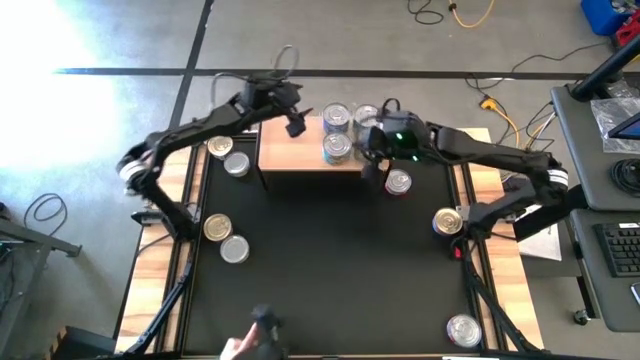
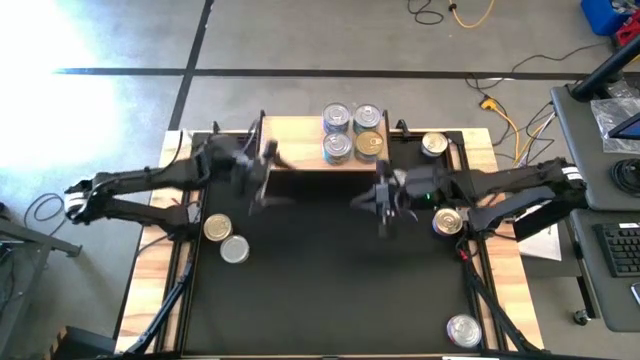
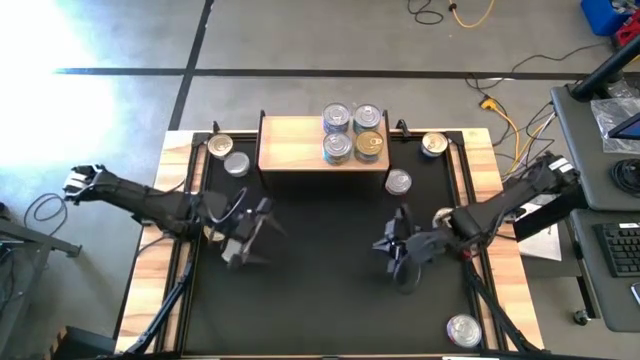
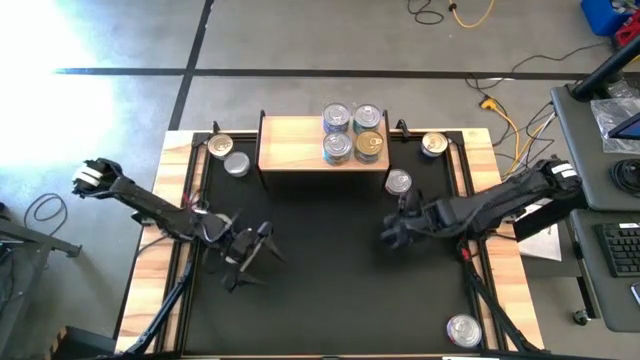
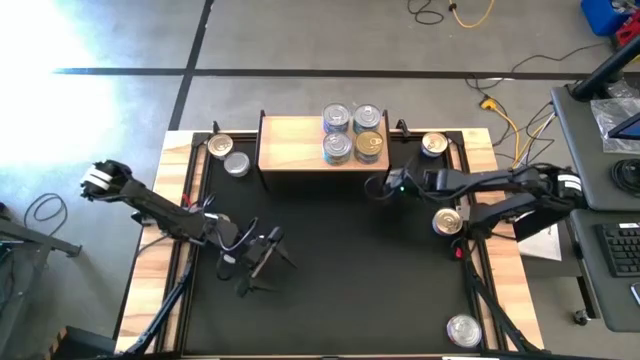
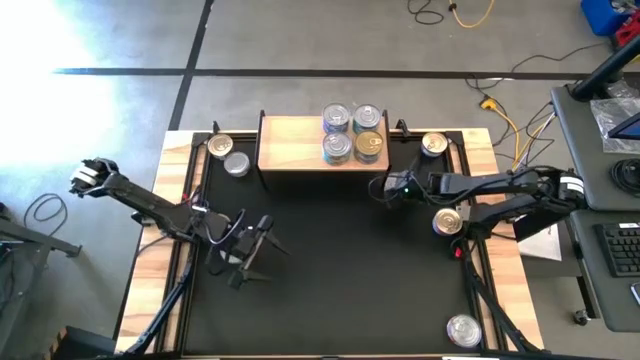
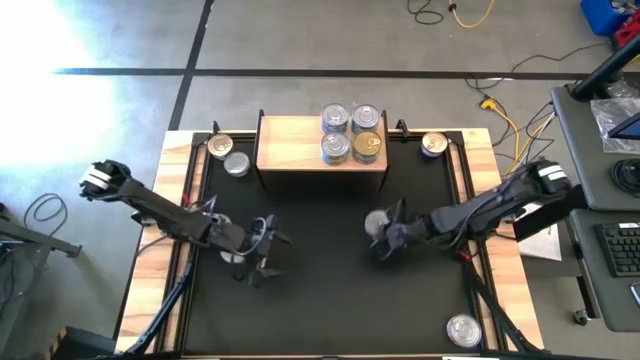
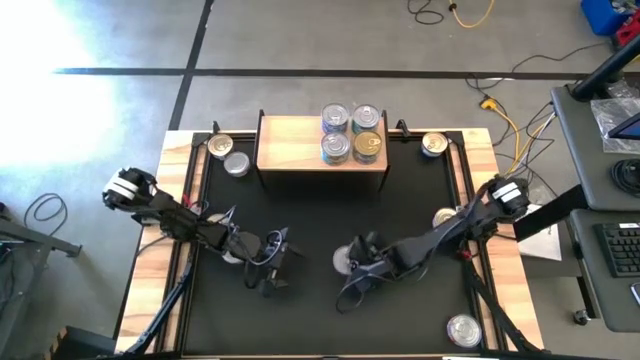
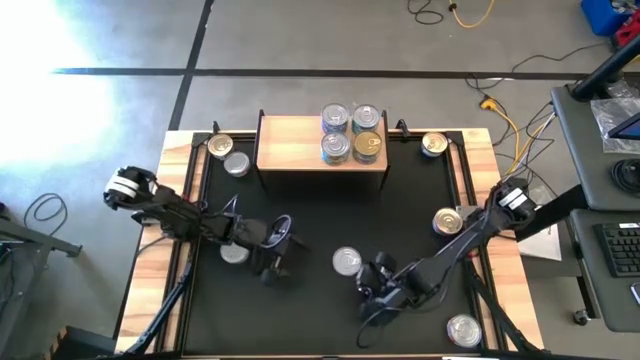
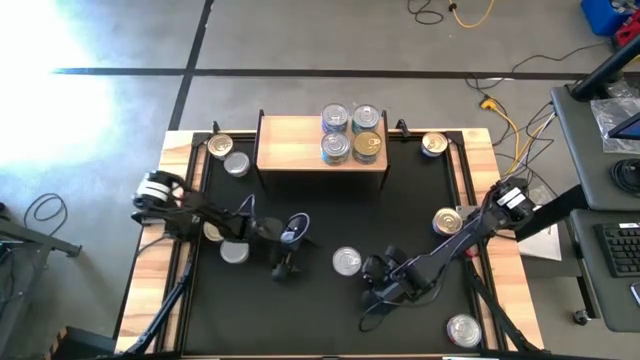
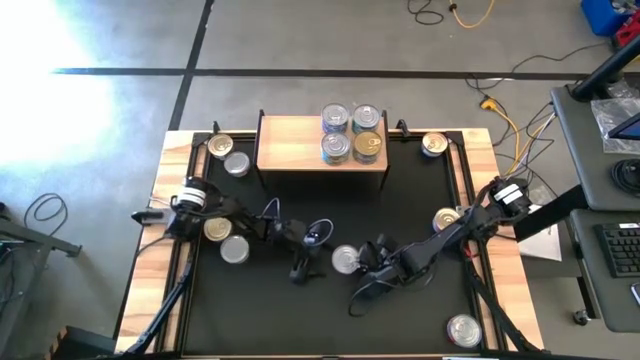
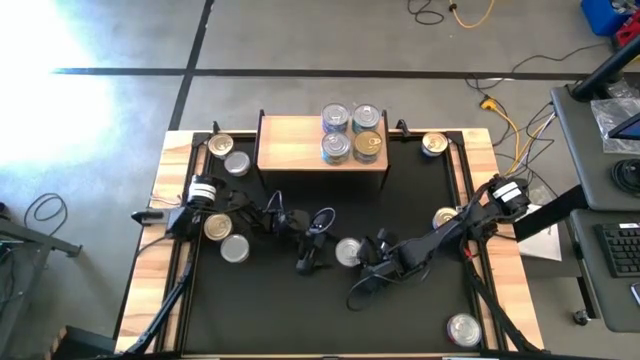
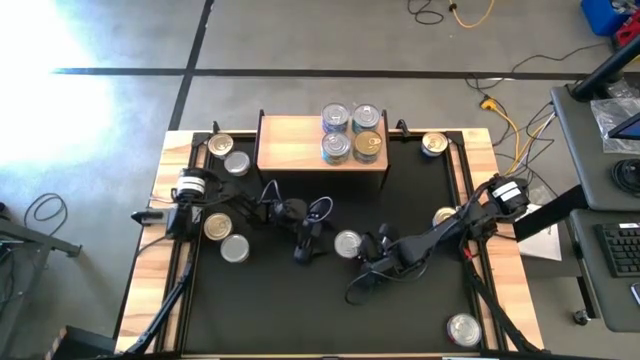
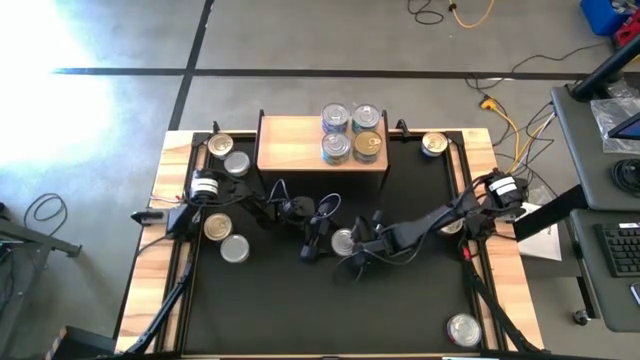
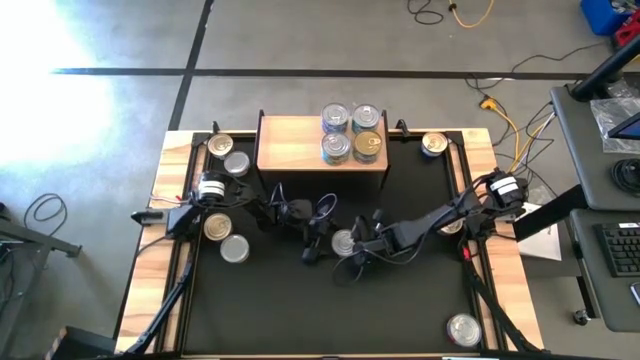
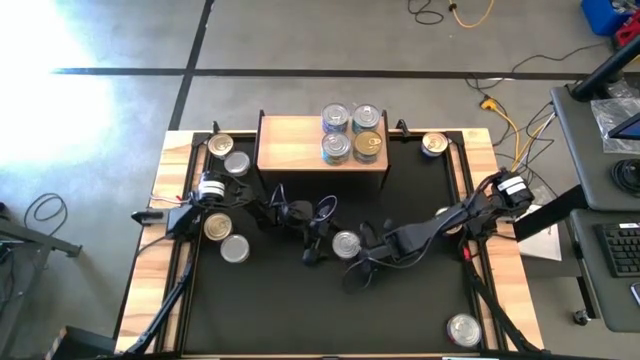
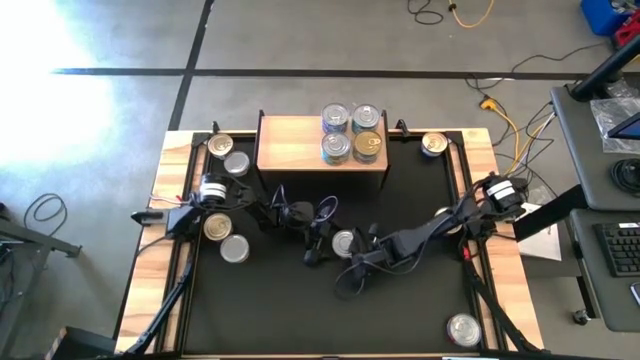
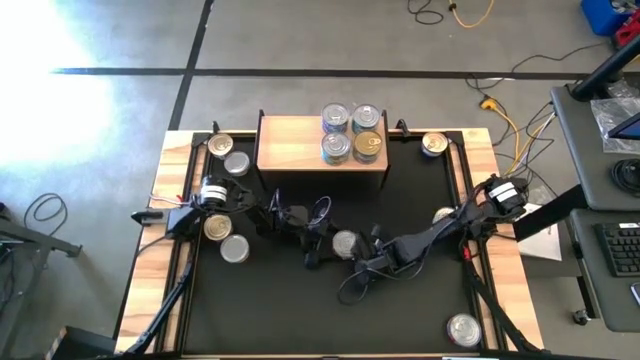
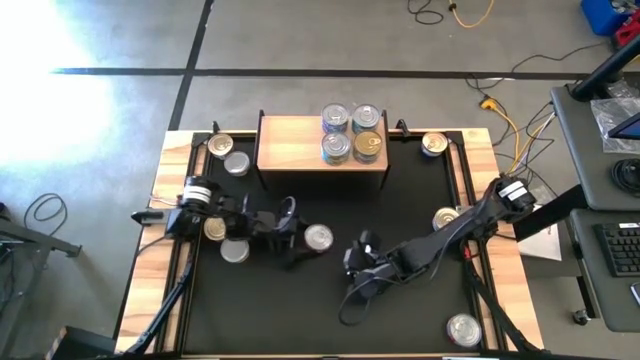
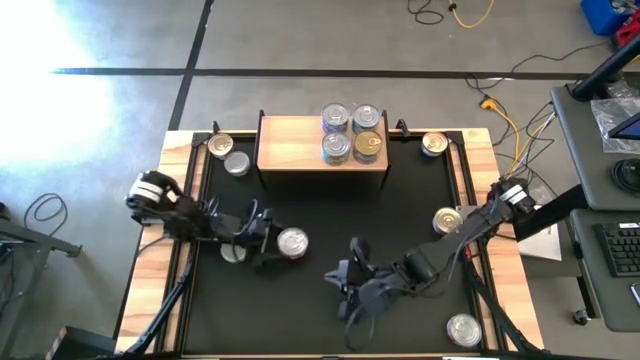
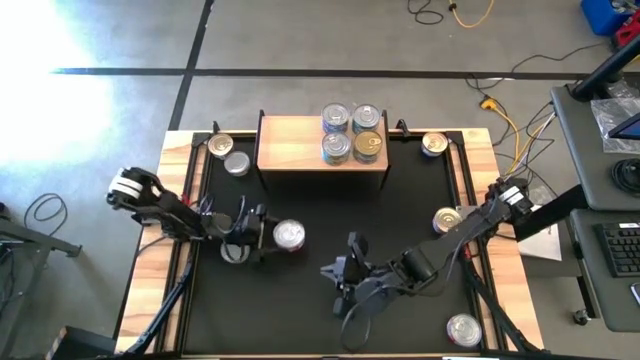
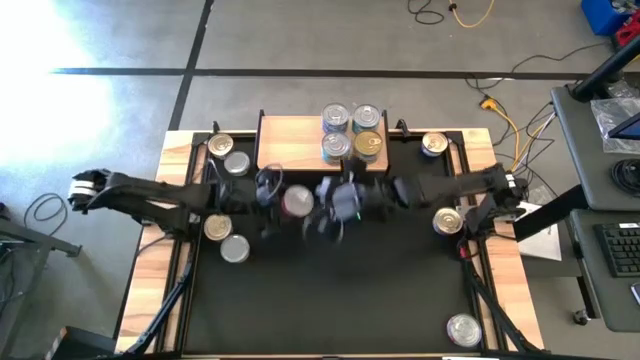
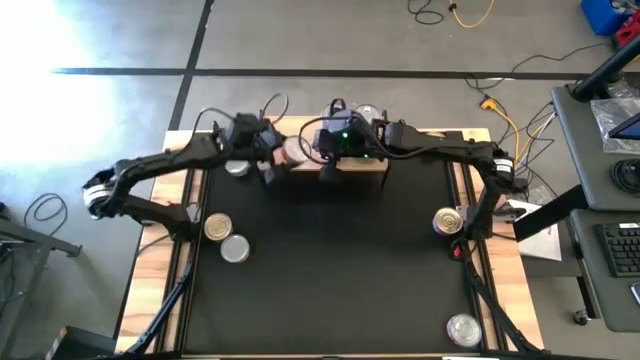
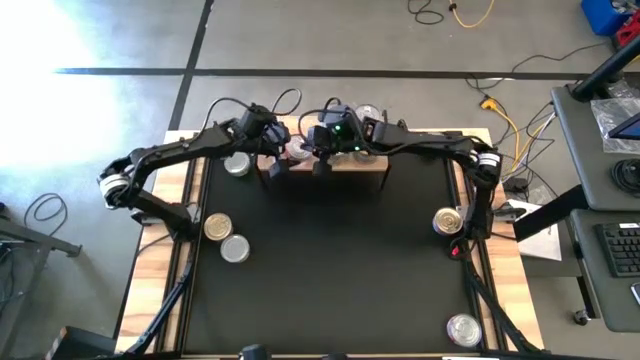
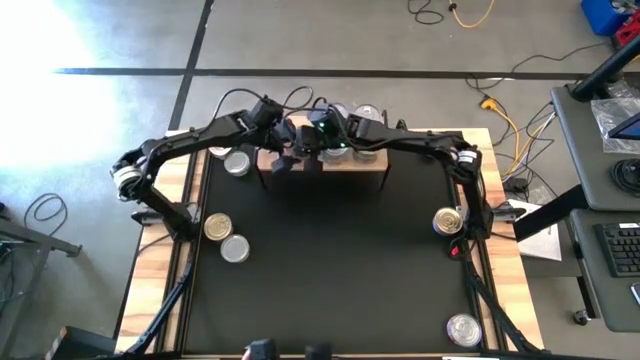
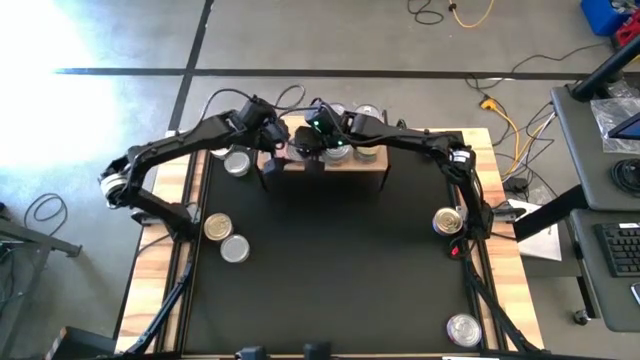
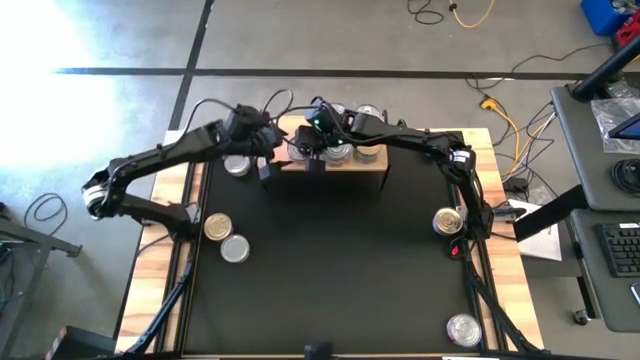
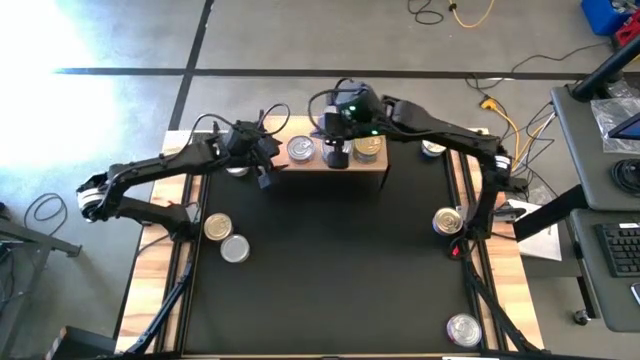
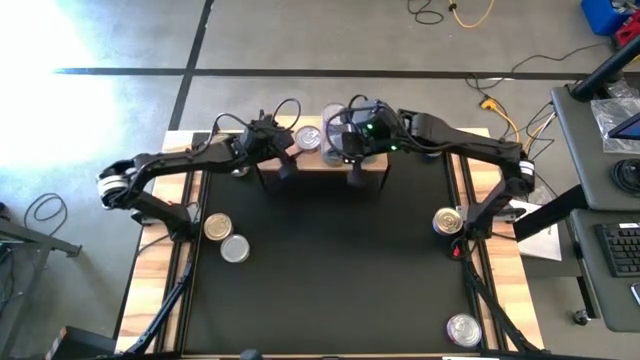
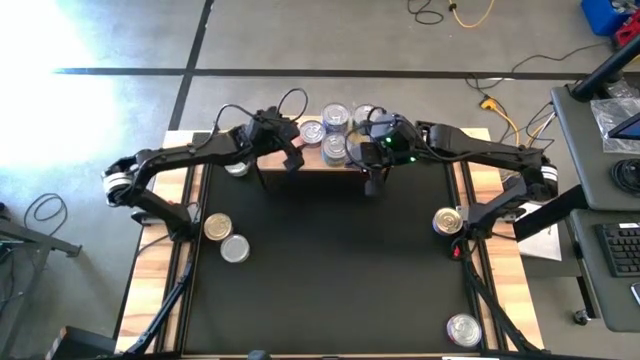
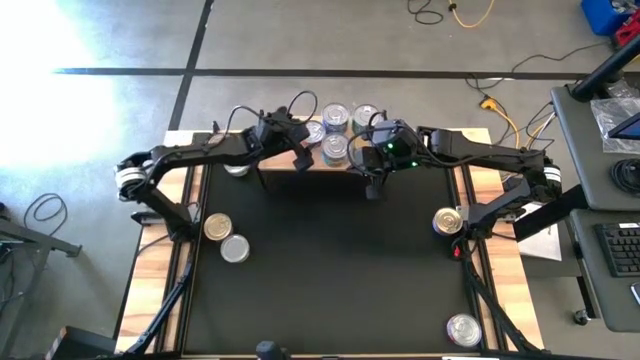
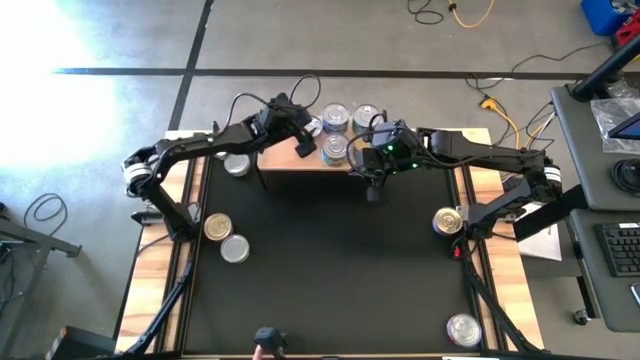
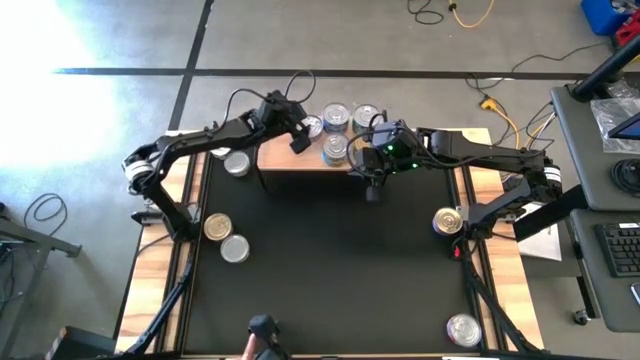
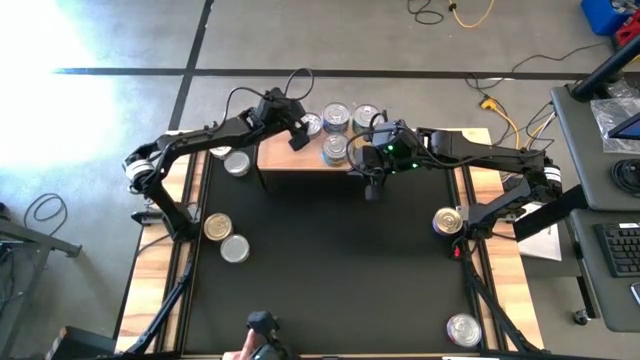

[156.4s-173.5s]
Task: Stack canned seafood by type on shelf
Put the top red tuna can on the shelf

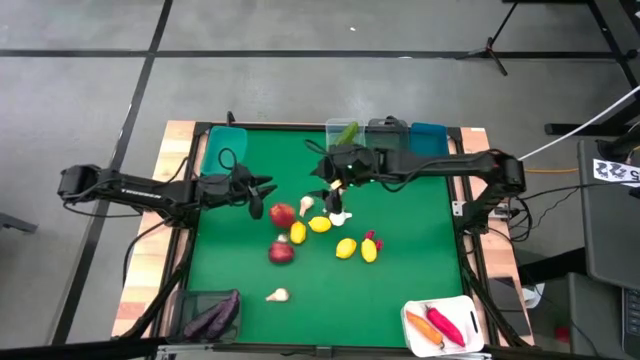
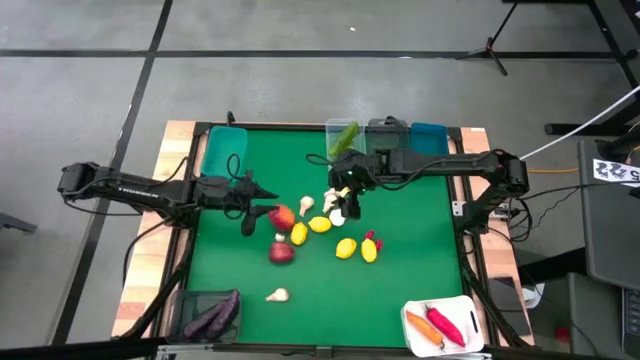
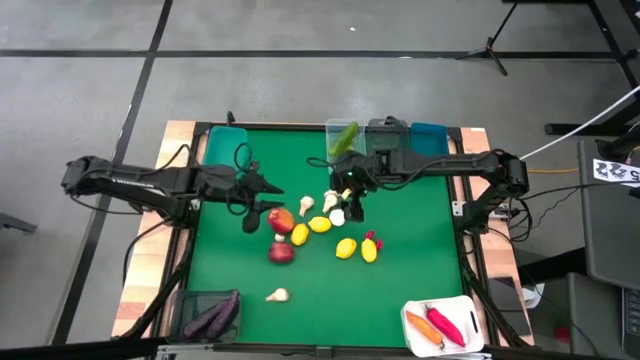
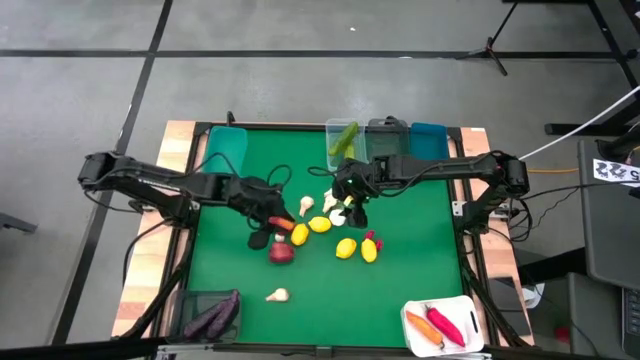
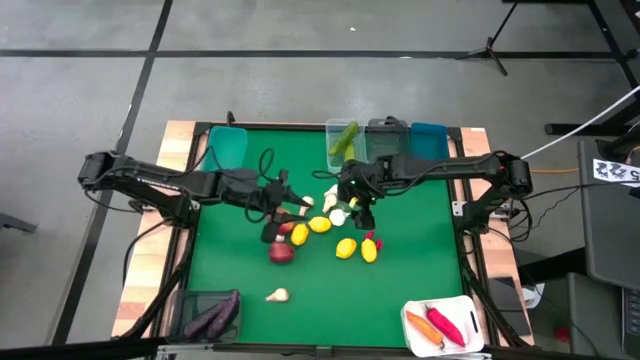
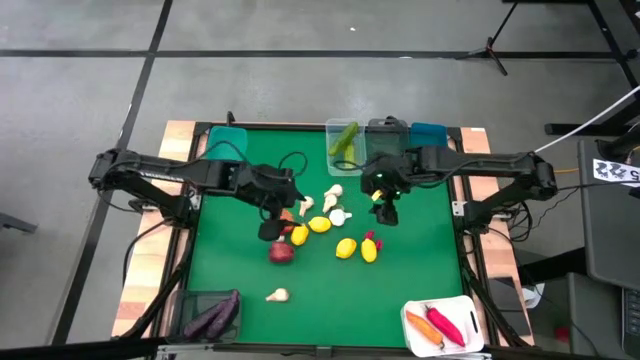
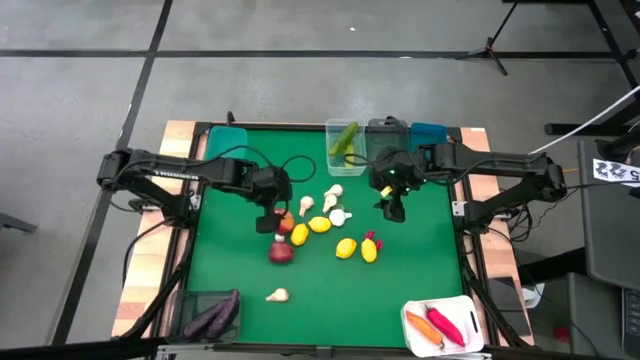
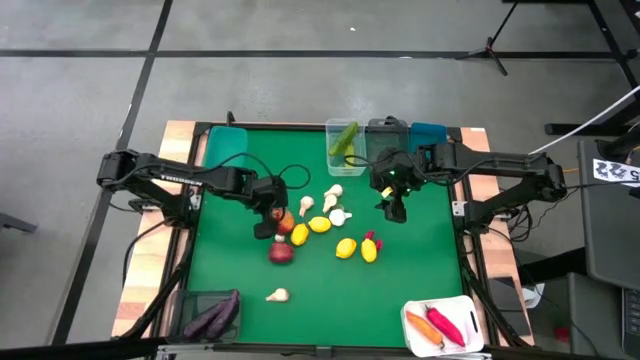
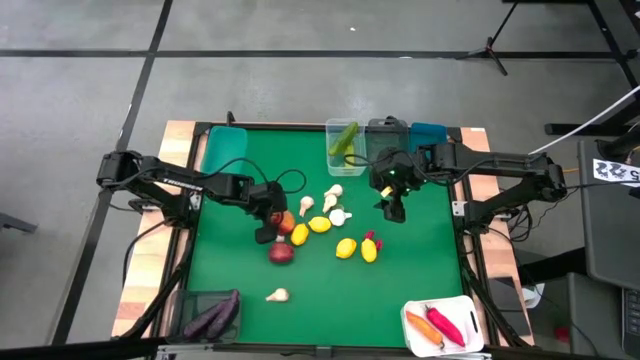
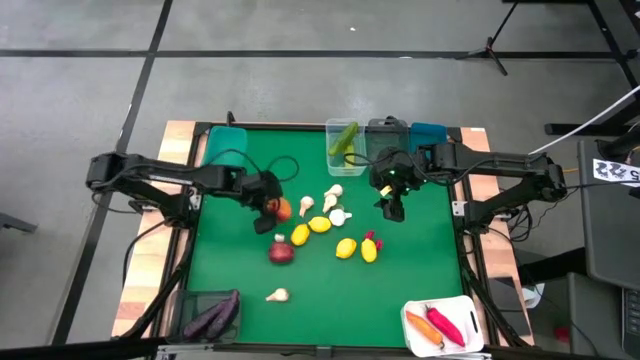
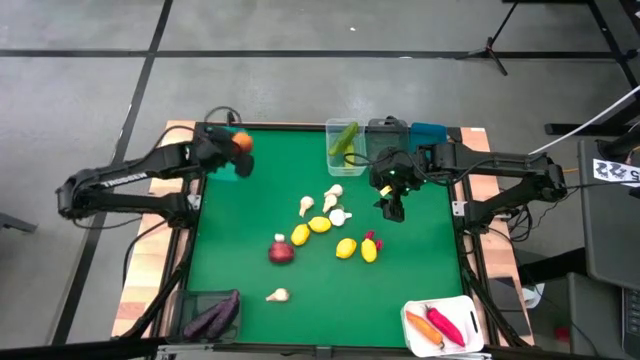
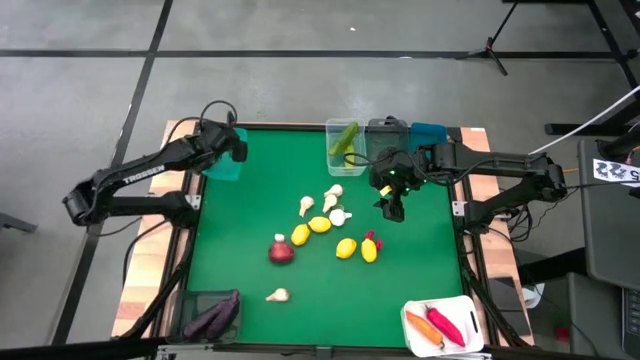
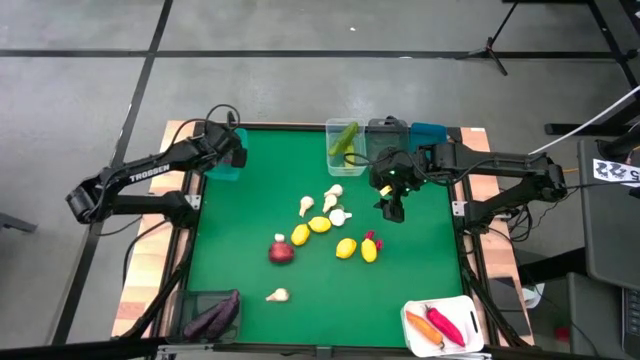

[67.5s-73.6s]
Task: Sort produce into baskets
Put the red apple into the green bin
